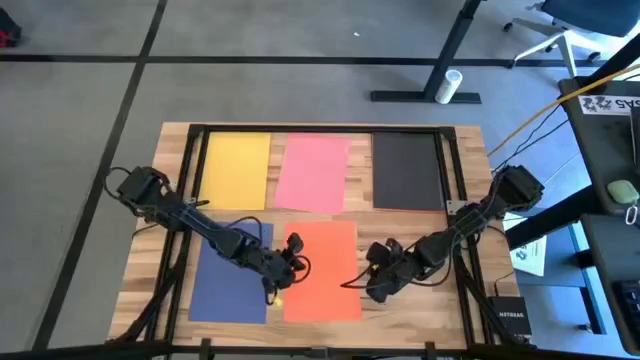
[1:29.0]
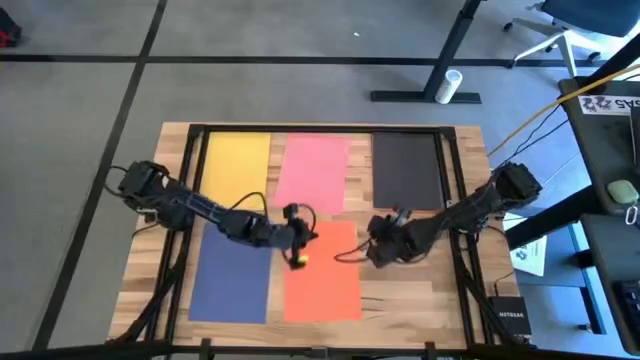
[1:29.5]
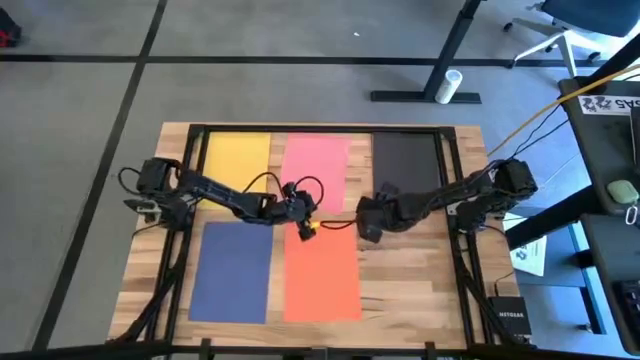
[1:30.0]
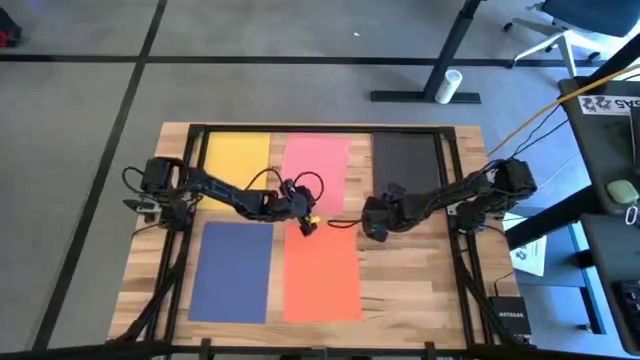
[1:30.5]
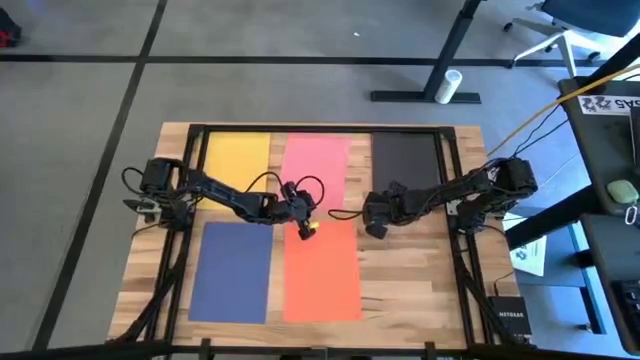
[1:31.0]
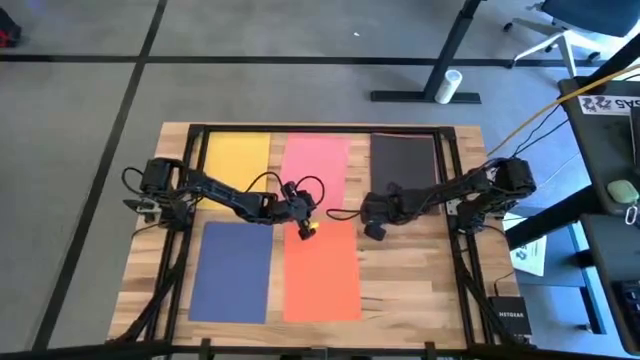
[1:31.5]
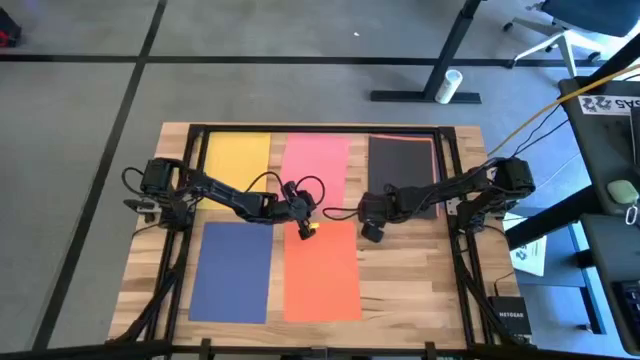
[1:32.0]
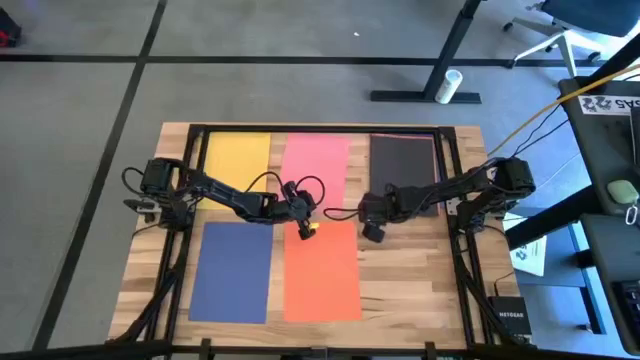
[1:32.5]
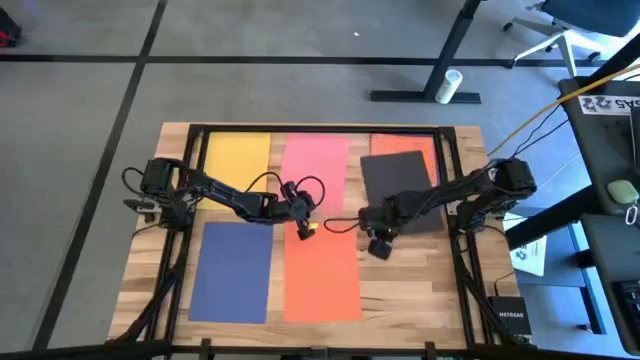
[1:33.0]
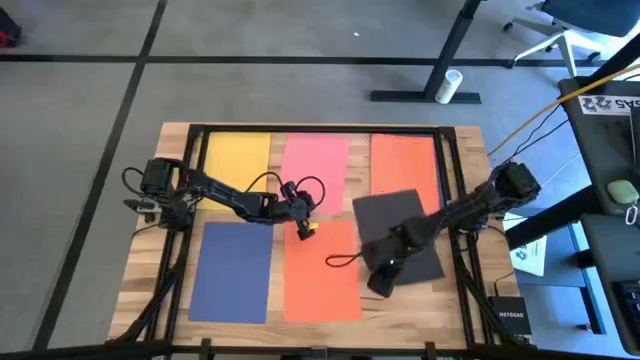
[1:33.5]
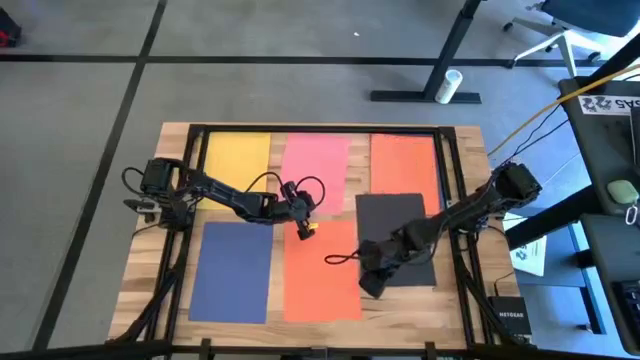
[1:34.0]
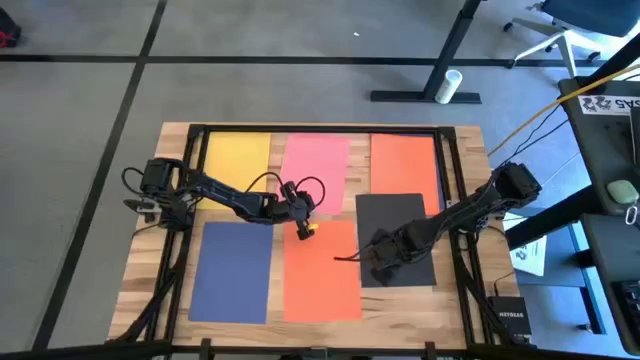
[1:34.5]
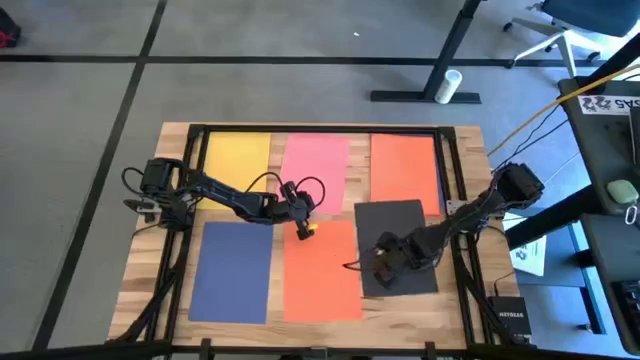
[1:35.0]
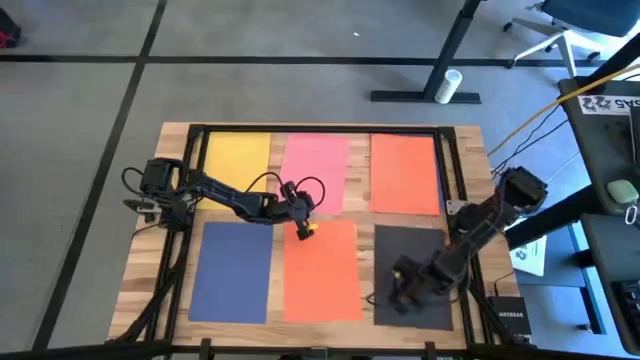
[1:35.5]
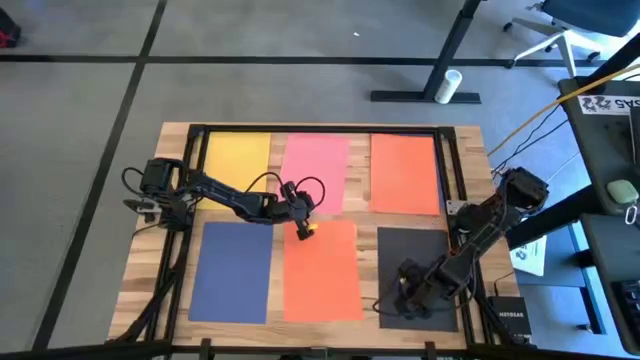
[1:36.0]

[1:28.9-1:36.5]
Task: Organize paper
Move the black paper to the bottom right of the table

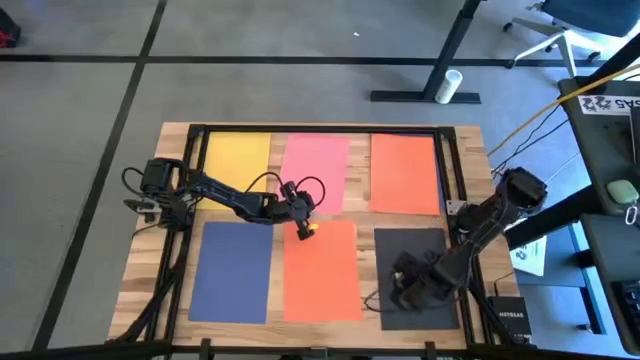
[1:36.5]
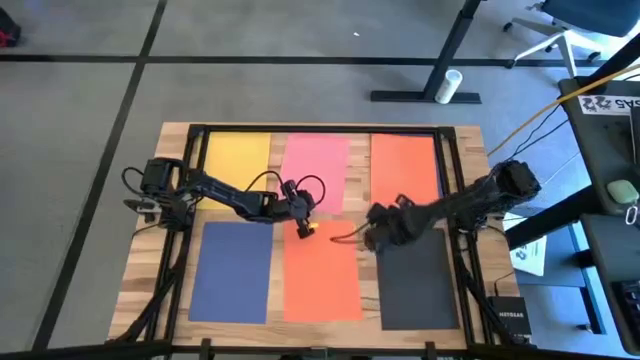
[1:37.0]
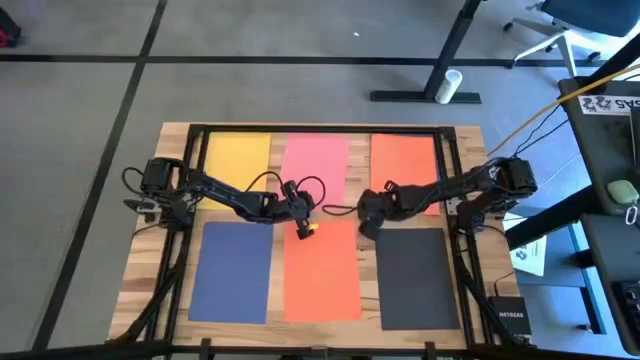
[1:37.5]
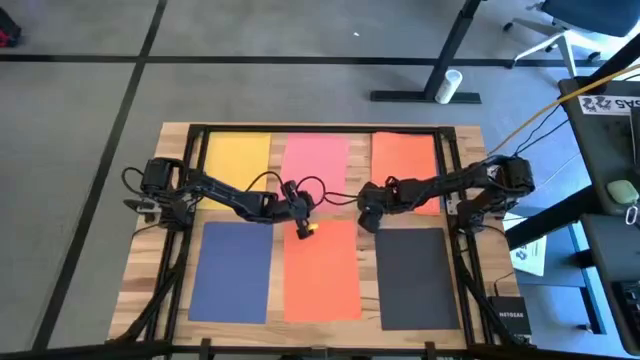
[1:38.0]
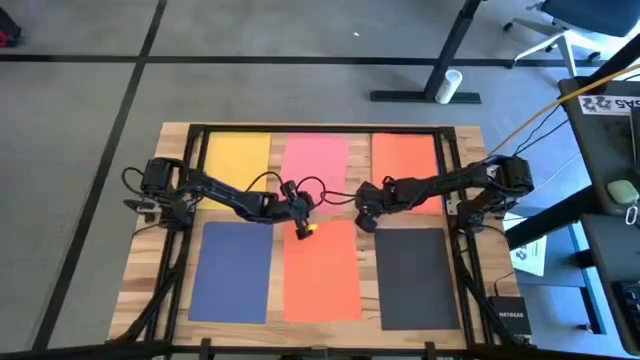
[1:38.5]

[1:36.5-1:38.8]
Stack the orange paper on top of the orange paper

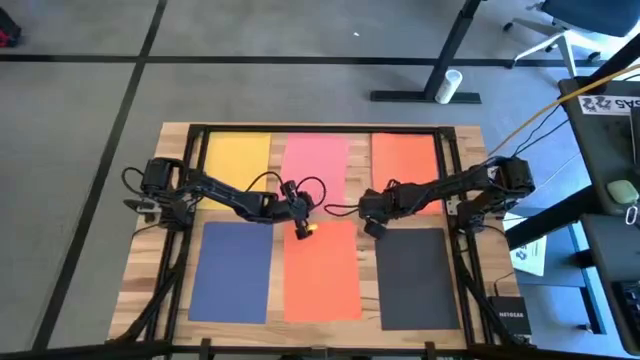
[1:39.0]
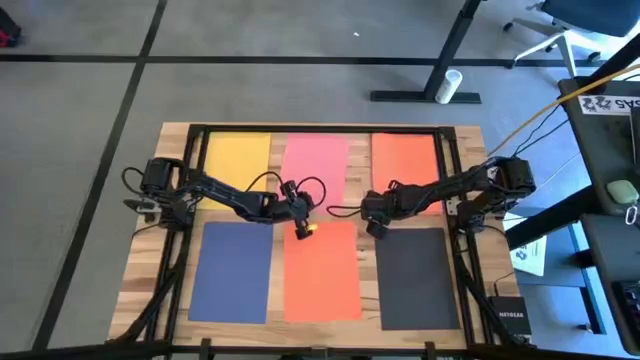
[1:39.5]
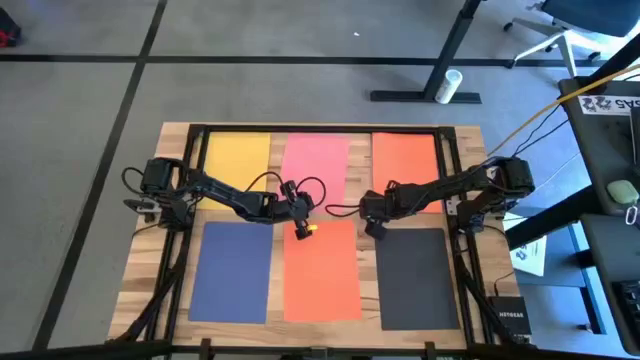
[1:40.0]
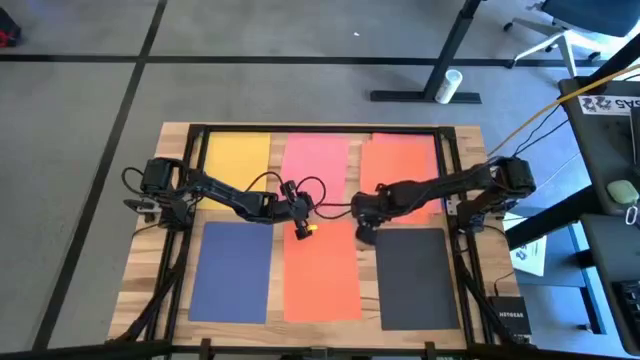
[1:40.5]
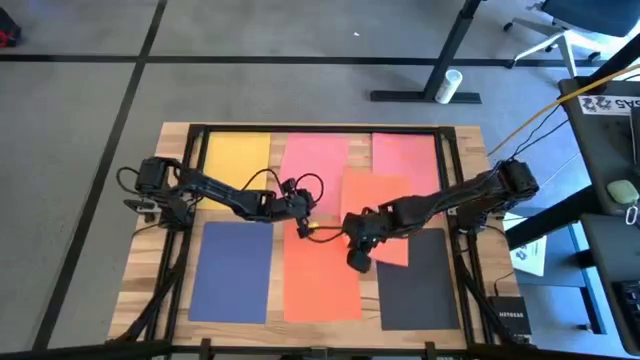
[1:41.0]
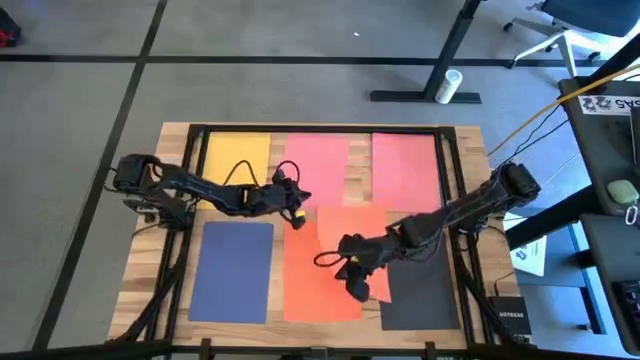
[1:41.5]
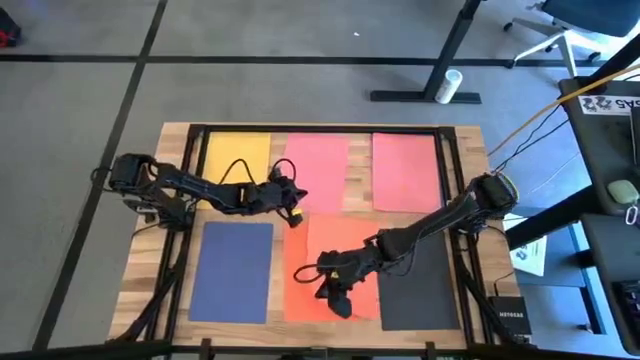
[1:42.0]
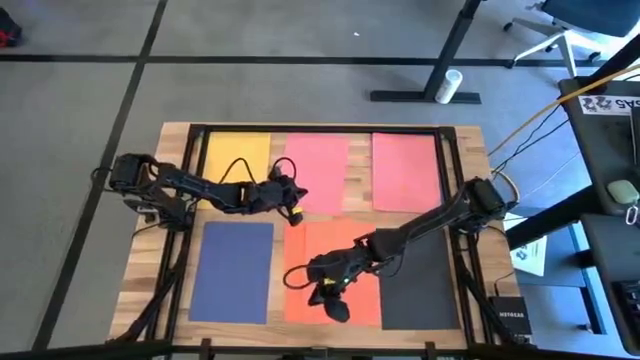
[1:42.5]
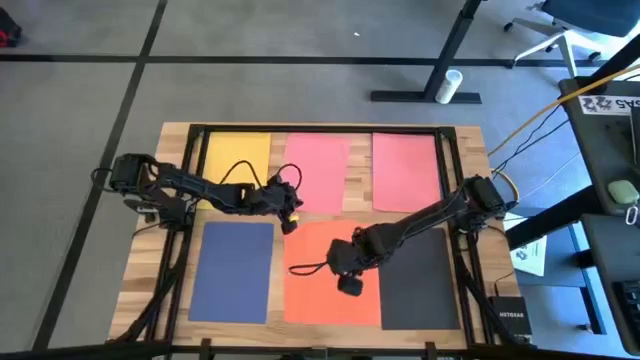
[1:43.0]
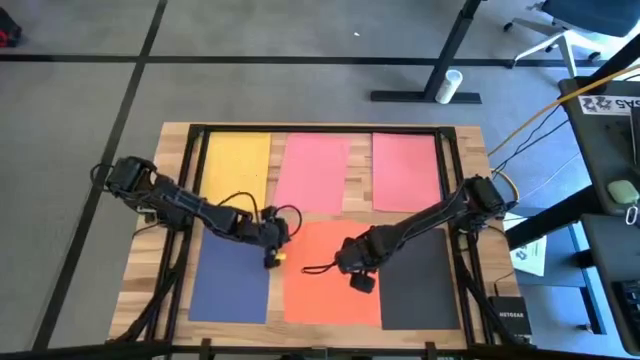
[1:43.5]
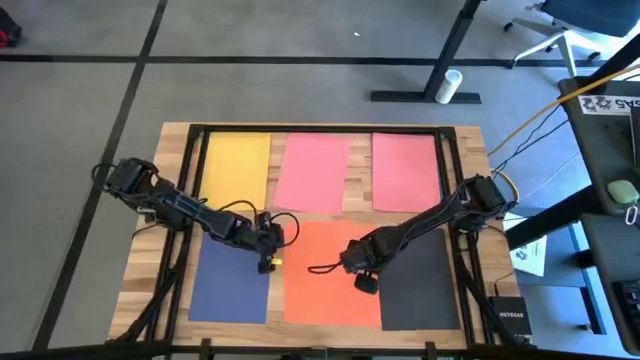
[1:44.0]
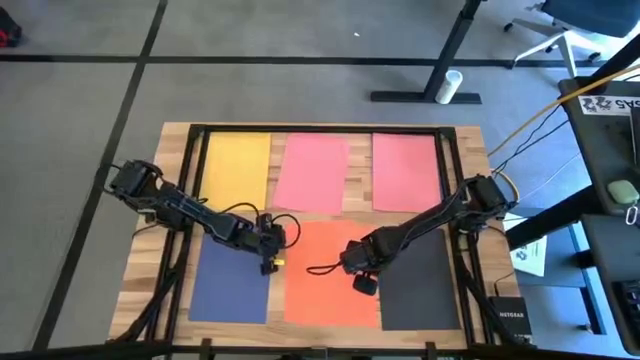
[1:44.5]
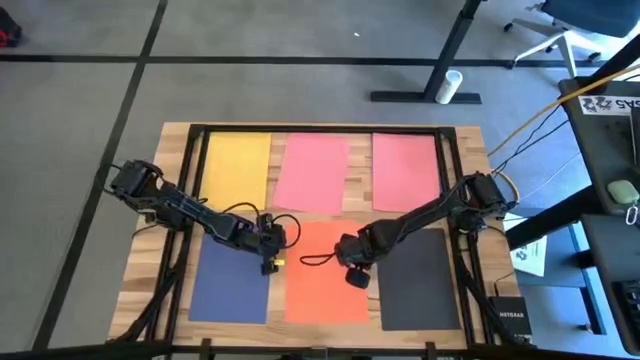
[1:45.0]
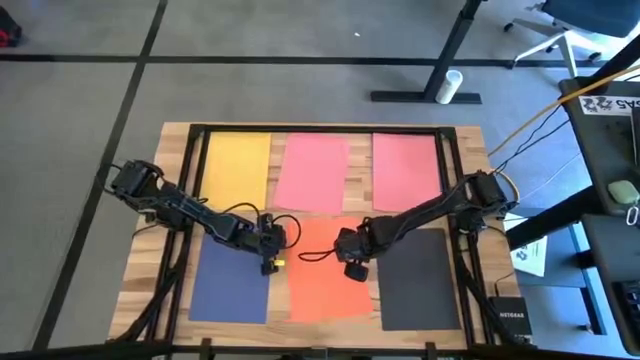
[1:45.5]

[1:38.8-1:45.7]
Stack the orange paper on top of the orange paper

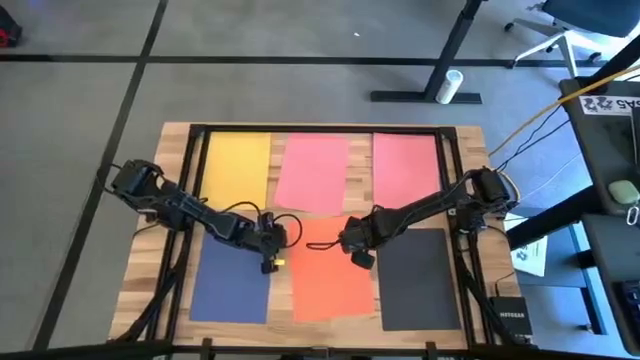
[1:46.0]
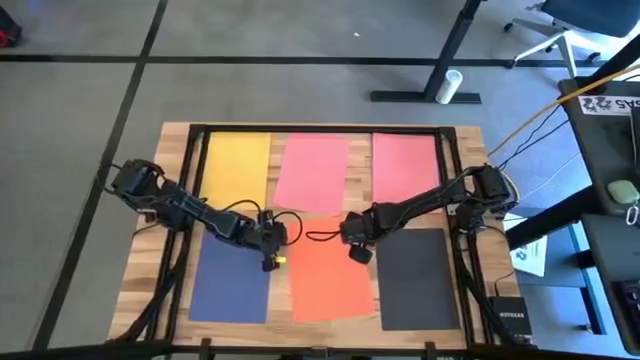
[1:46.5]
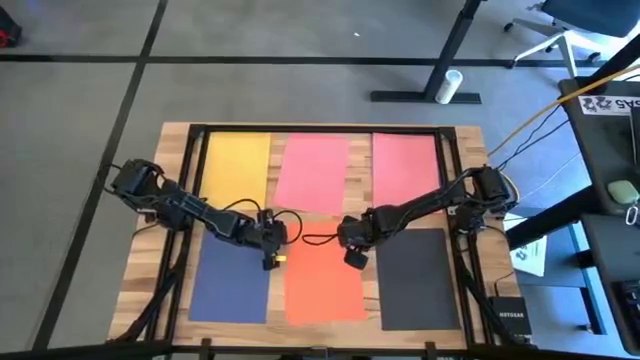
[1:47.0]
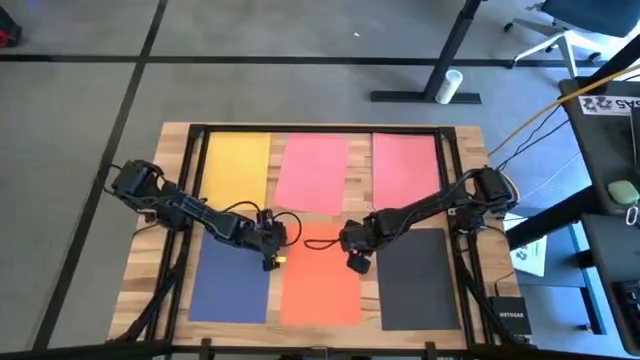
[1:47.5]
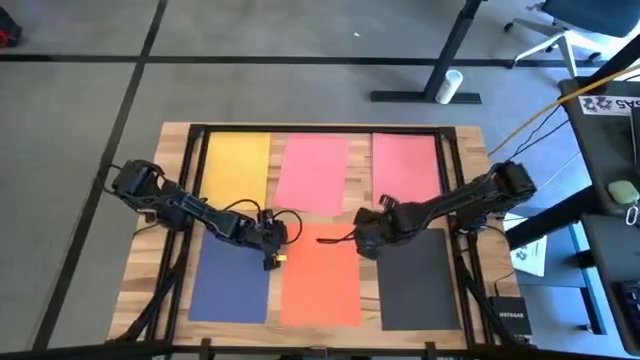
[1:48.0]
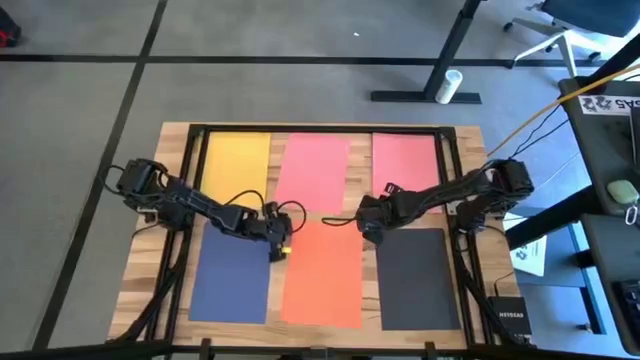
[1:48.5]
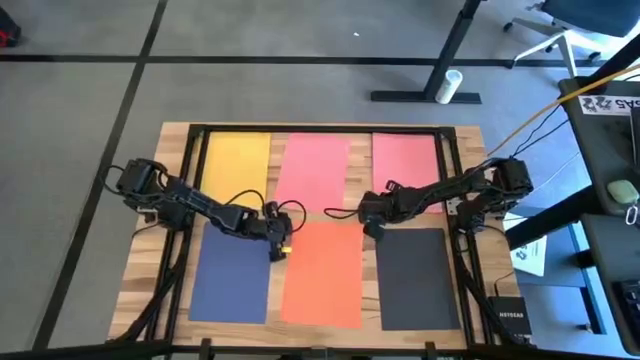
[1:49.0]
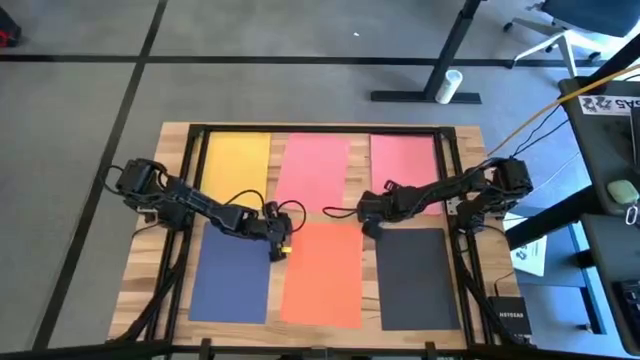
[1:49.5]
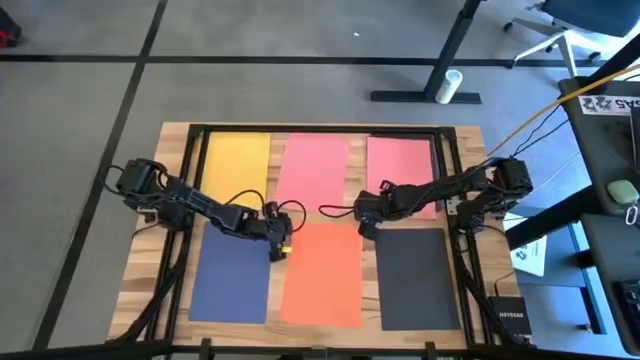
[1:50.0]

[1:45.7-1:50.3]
Stack the pink paper on top of the pink paper
